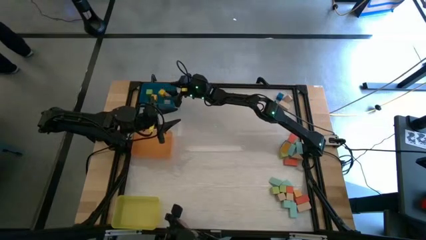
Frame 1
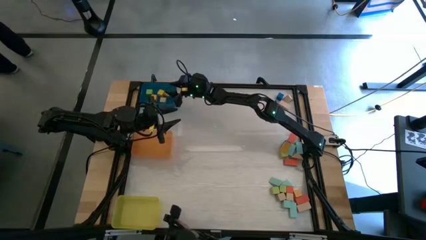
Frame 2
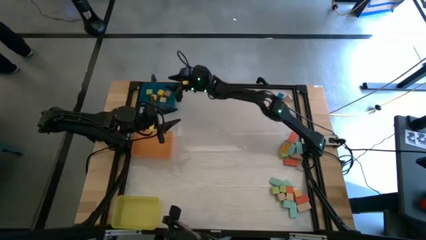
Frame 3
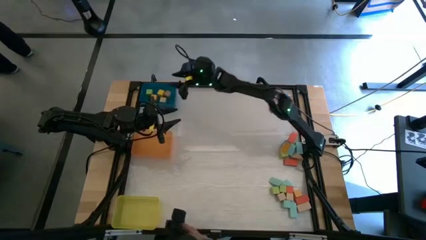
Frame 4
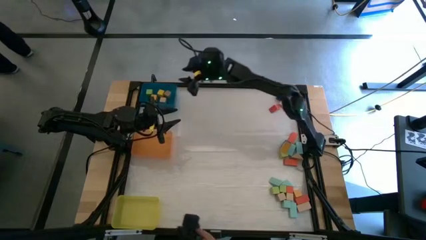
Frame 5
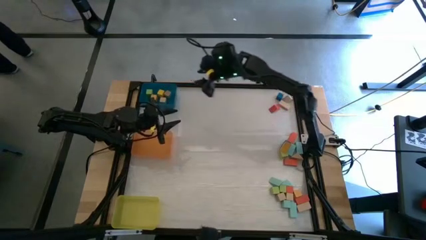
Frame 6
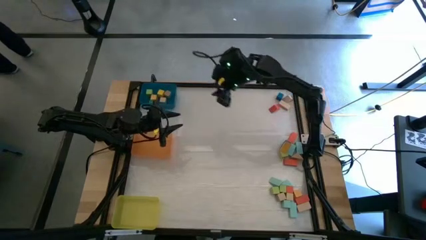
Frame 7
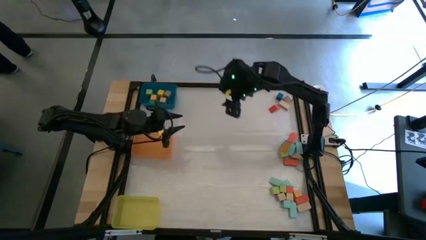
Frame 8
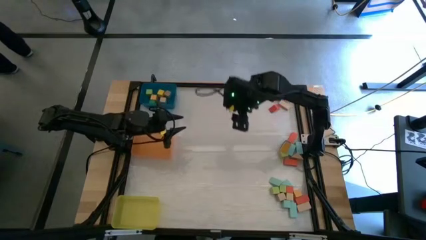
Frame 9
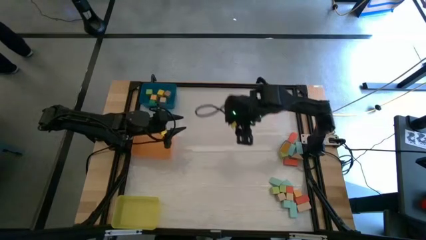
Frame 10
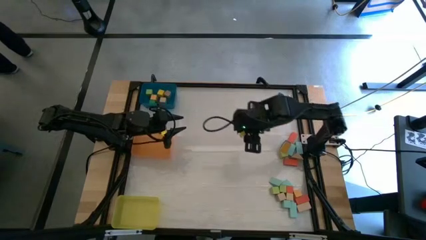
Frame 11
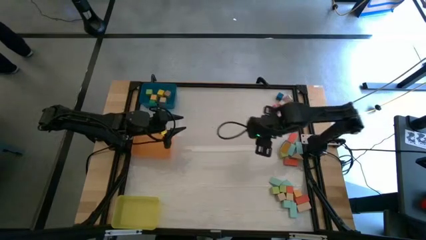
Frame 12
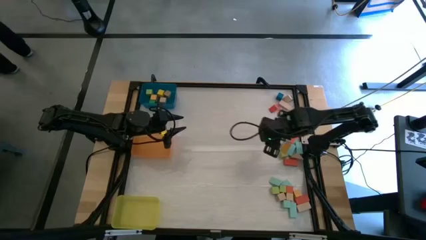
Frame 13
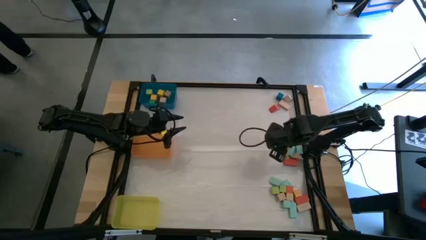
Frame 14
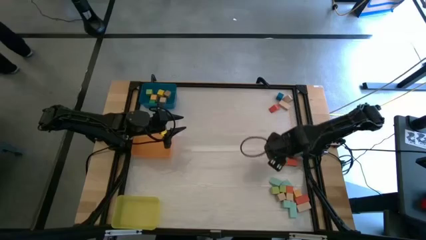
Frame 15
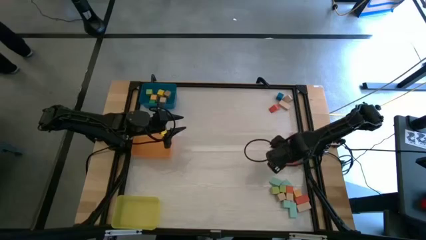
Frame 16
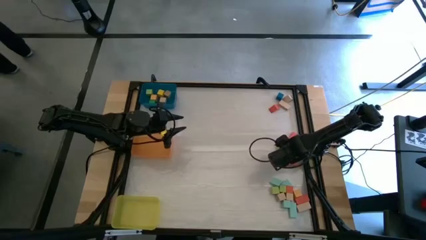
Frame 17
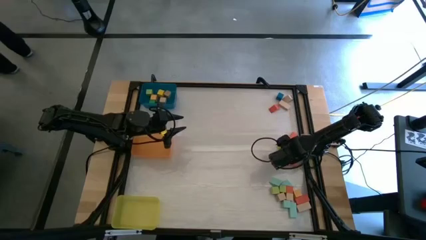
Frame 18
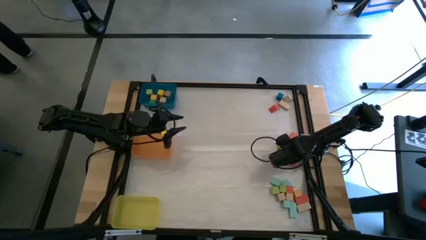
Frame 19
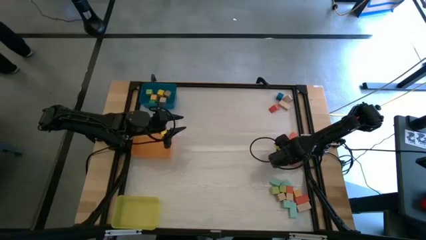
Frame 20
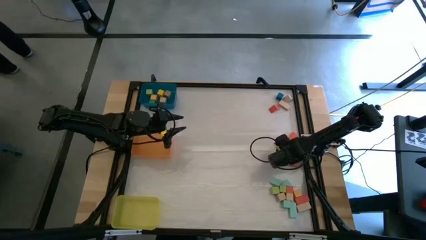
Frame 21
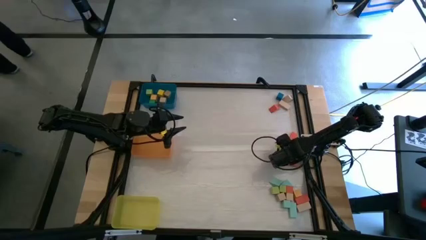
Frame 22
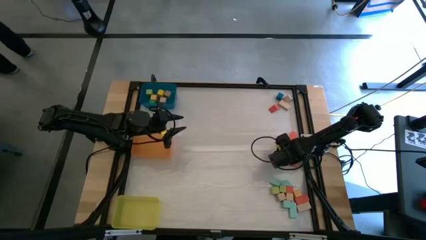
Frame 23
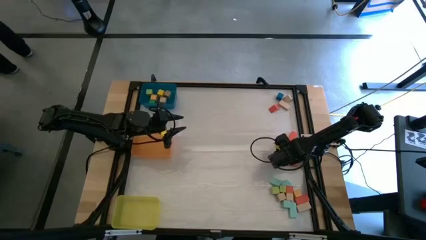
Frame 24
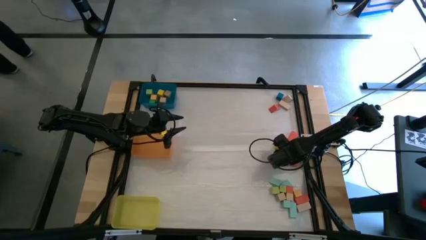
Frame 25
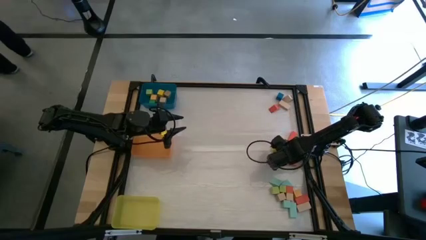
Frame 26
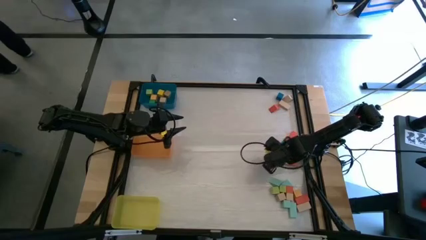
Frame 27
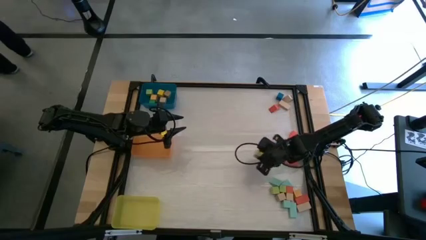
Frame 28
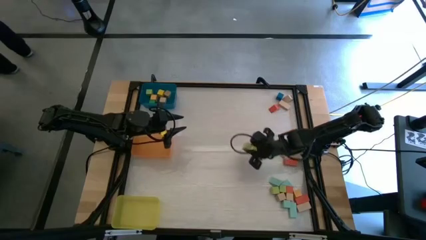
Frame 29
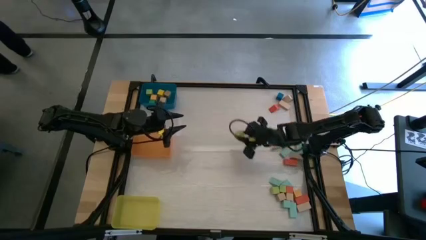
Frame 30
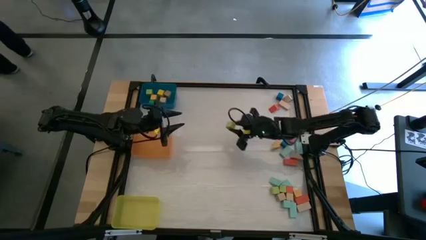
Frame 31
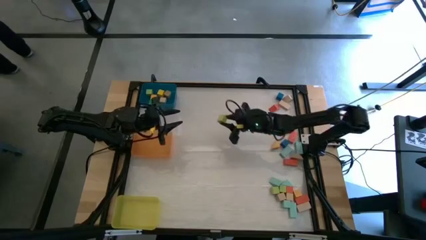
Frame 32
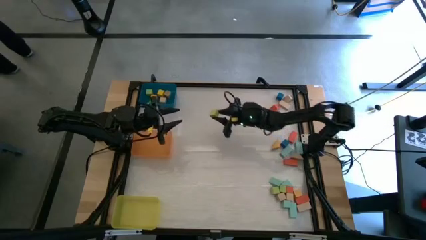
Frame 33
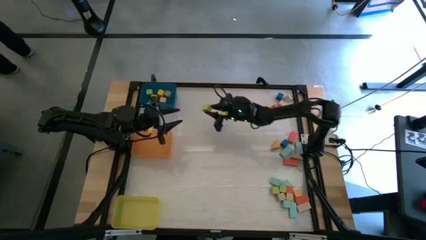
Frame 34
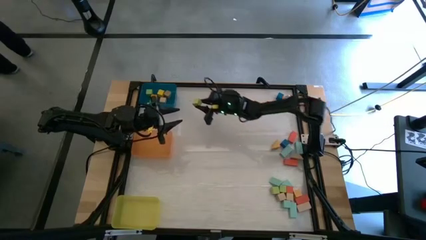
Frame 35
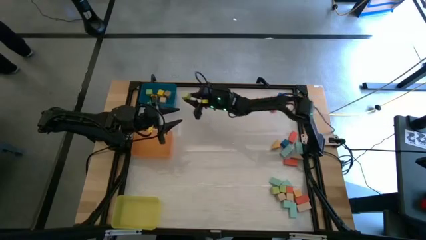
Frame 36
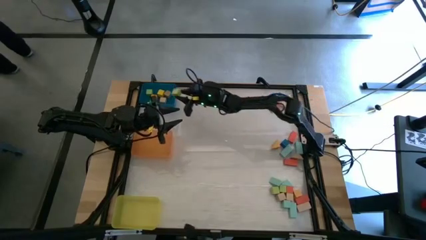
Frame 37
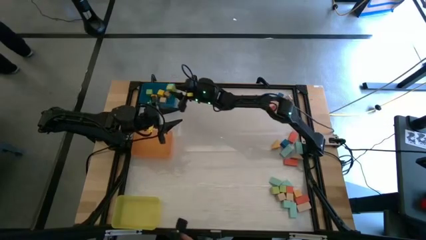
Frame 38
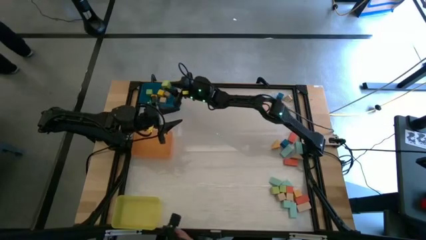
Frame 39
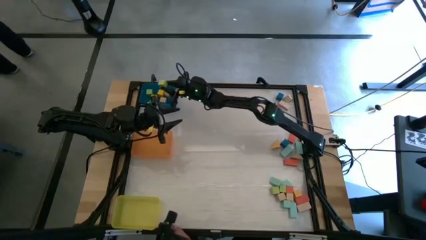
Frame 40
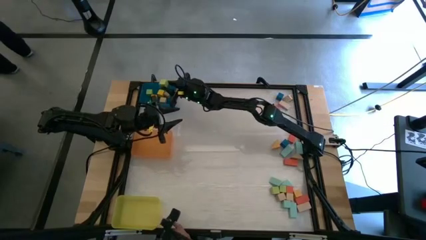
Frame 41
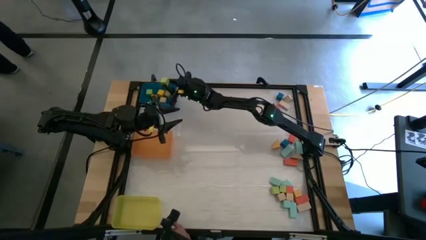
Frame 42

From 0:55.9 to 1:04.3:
Task: Sort blocks by size
Put the light green cube block into the blue bin

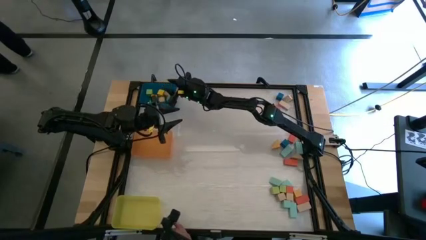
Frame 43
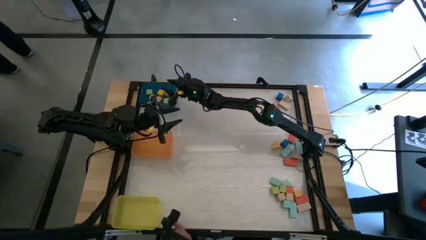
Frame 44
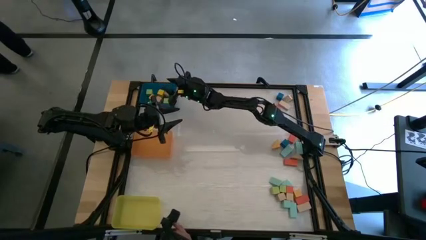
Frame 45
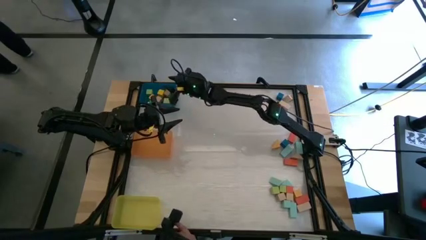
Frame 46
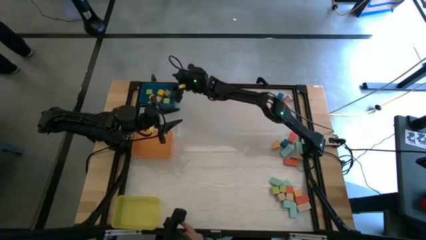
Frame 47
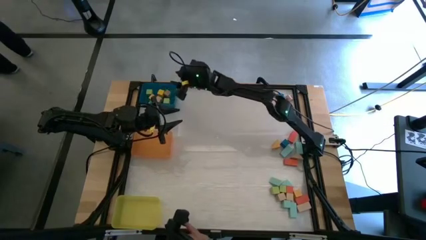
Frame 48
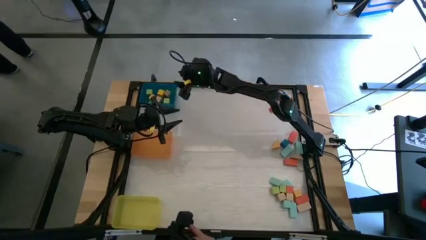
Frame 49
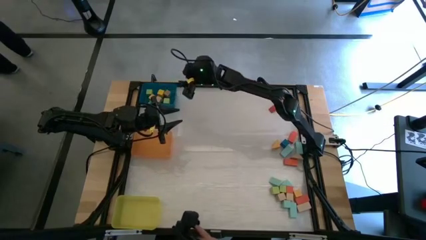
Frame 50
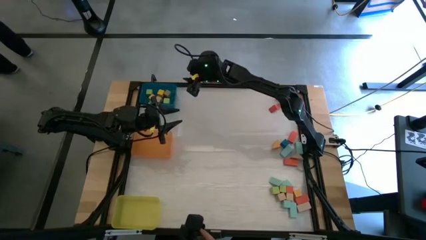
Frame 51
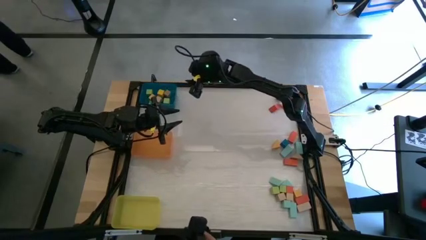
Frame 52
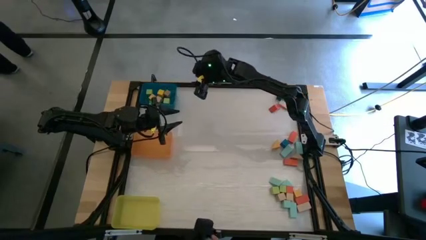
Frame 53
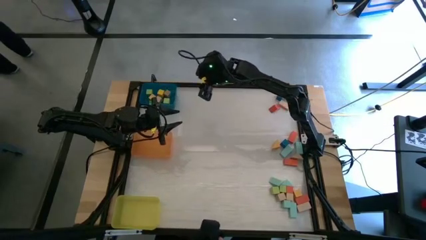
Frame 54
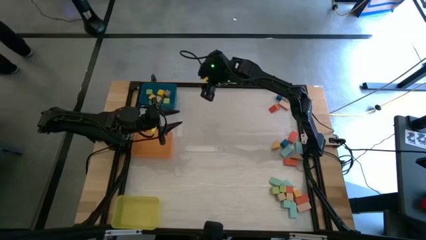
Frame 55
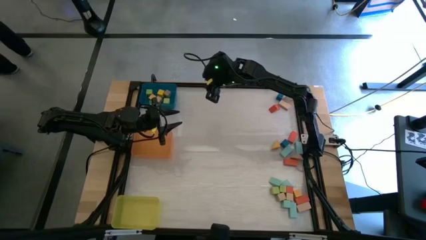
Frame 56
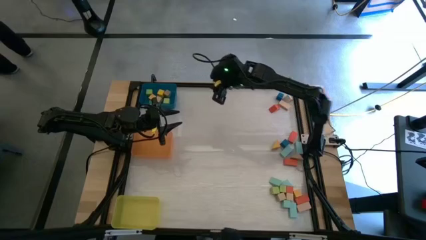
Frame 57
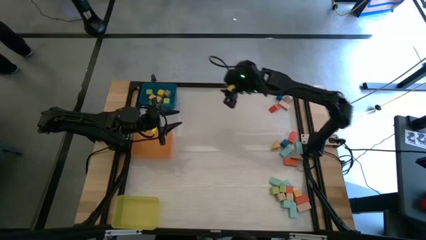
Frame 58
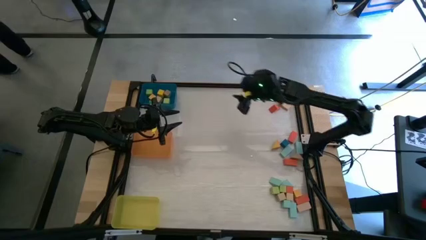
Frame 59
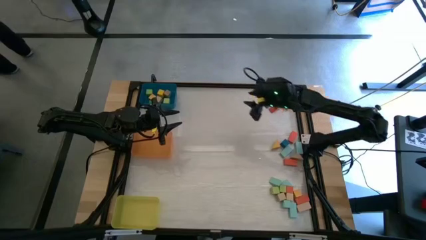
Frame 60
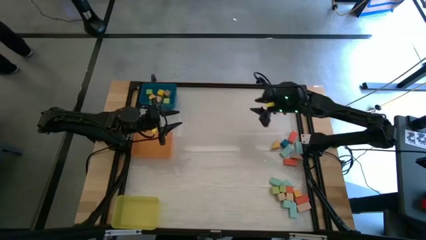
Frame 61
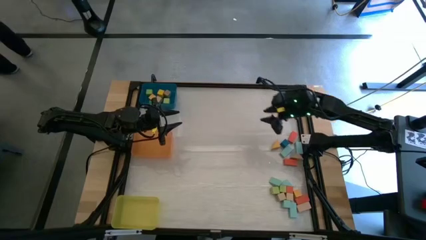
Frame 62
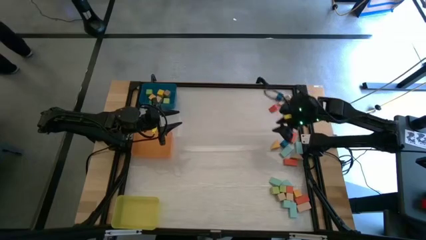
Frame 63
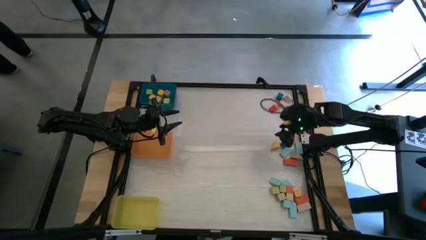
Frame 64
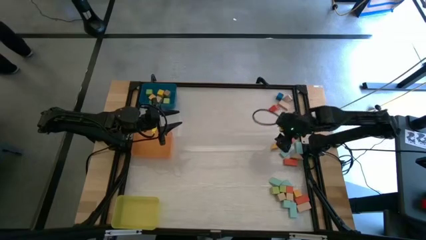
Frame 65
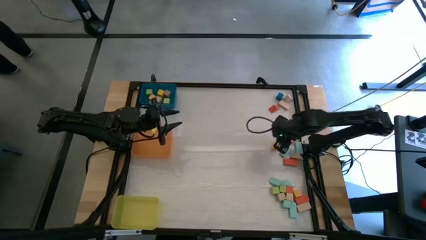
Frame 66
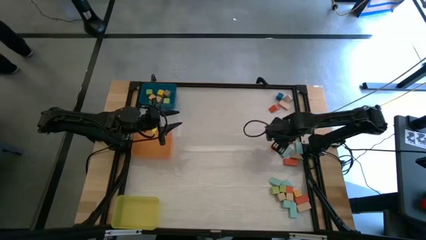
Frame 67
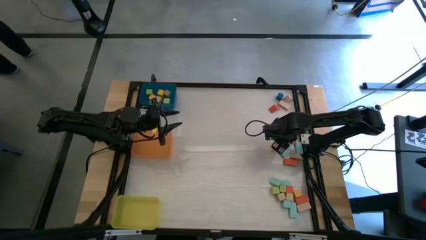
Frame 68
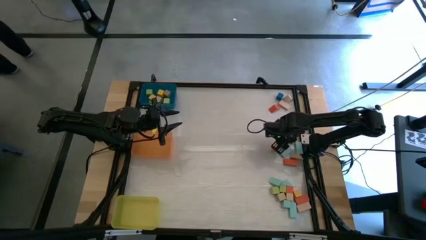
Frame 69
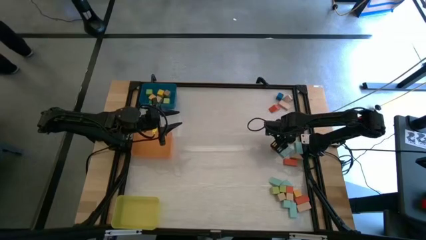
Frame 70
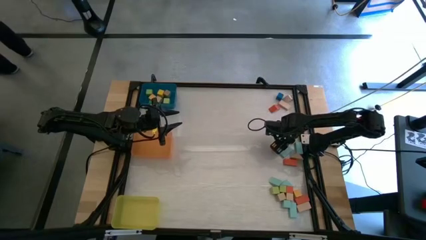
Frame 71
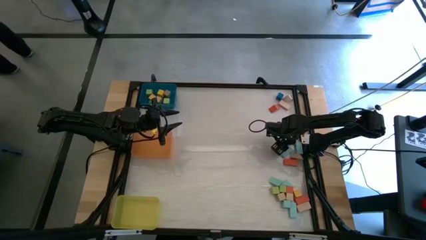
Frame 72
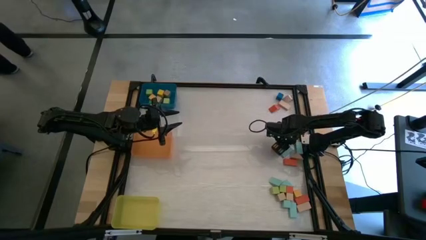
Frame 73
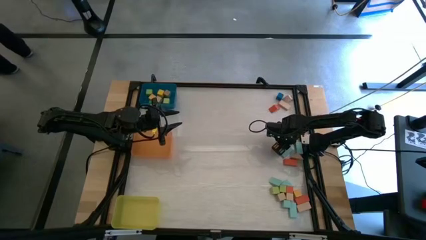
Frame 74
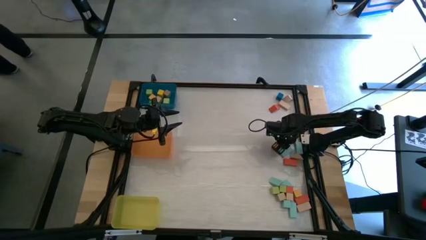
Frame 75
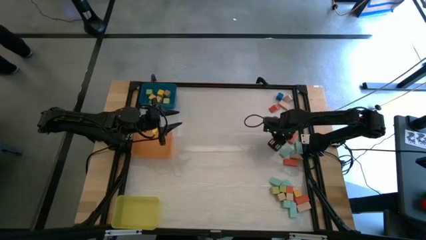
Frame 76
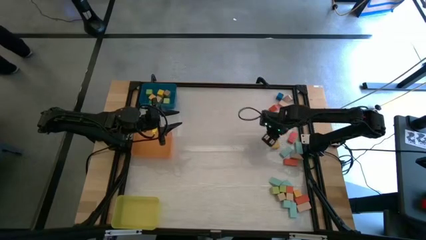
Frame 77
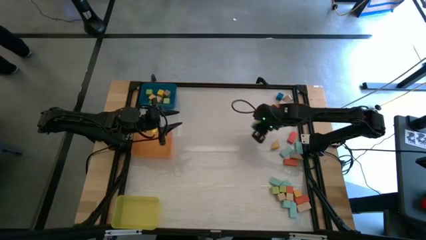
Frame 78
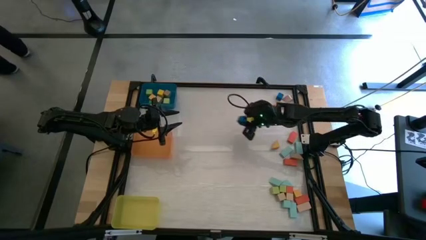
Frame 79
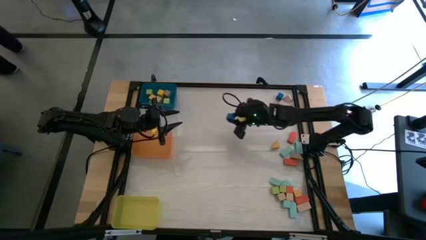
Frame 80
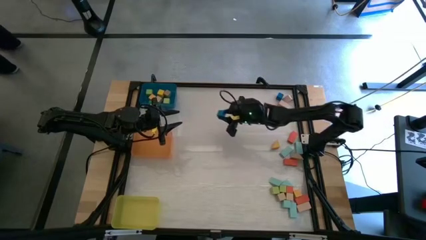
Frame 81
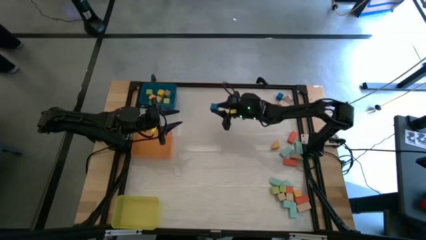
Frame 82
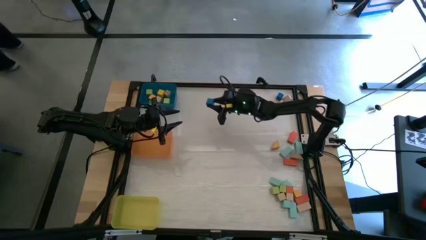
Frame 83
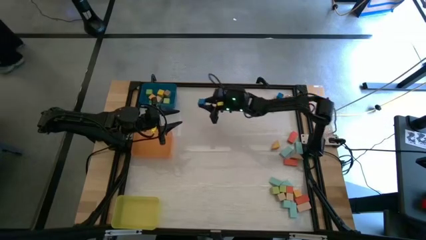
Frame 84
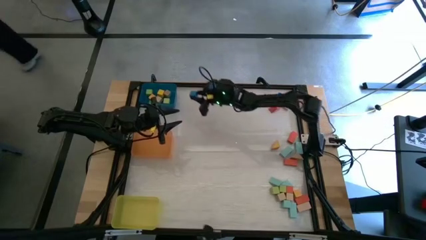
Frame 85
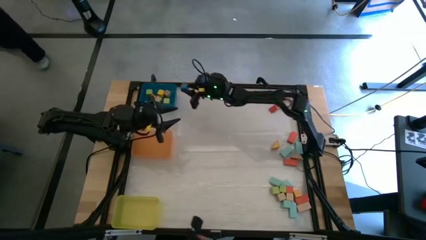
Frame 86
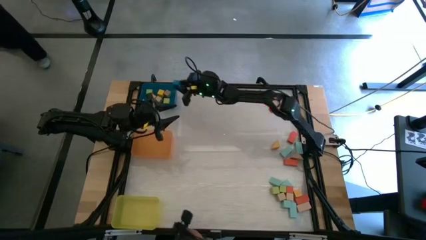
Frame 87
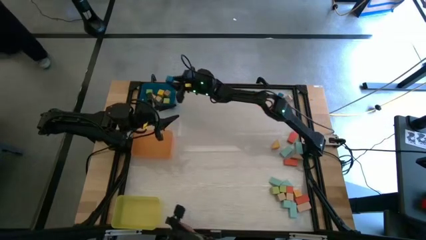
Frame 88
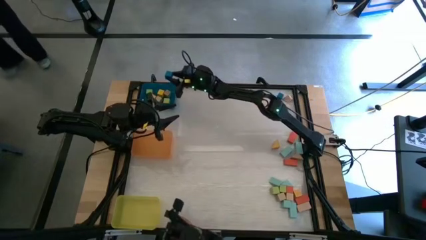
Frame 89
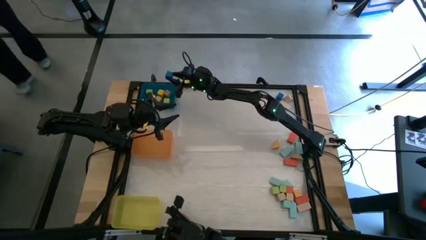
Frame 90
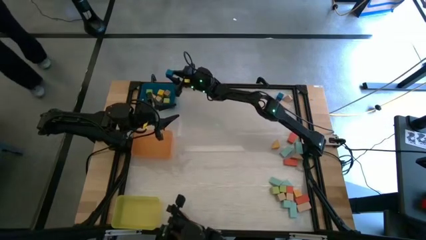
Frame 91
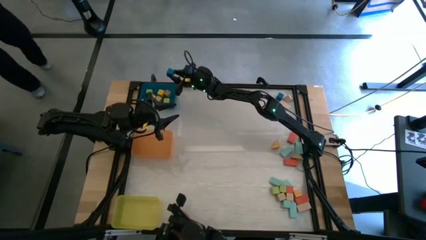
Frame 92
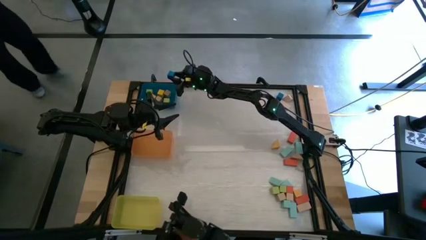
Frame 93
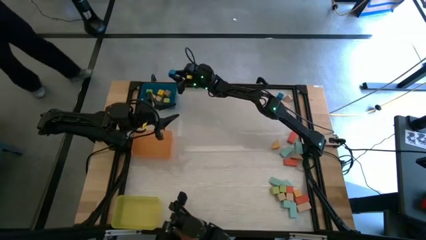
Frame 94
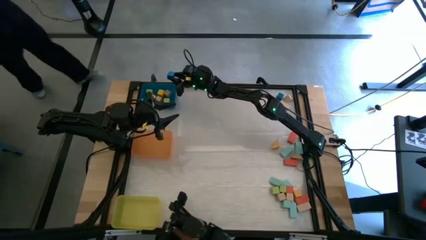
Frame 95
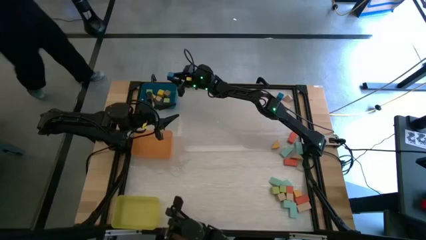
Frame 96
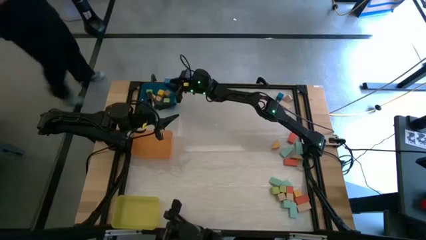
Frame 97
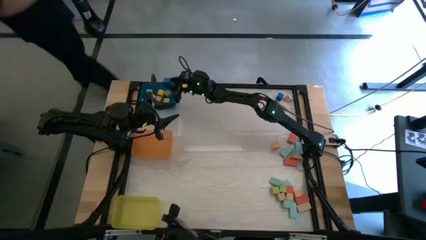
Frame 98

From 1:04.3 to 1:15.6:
Put the blue cube block into the blue bin
